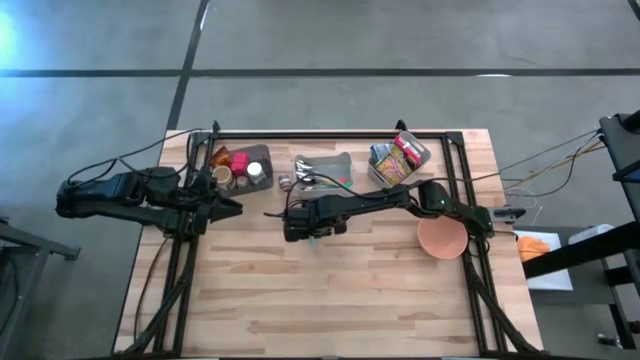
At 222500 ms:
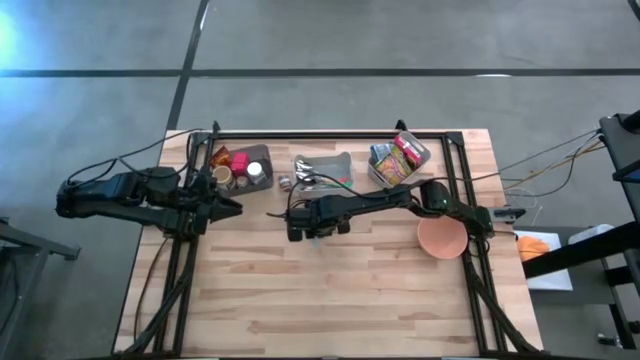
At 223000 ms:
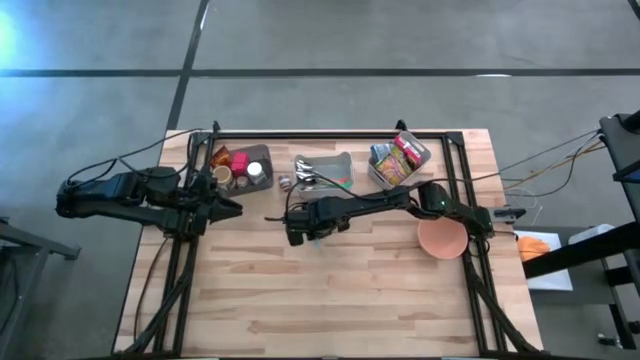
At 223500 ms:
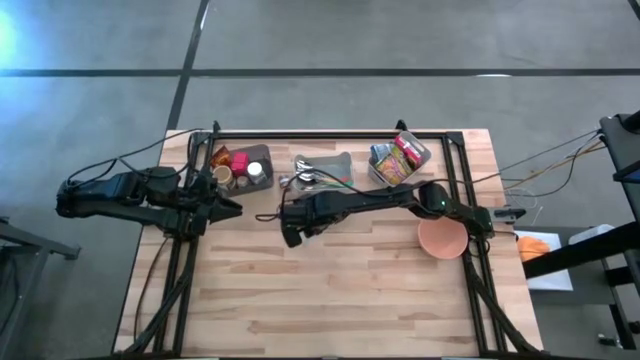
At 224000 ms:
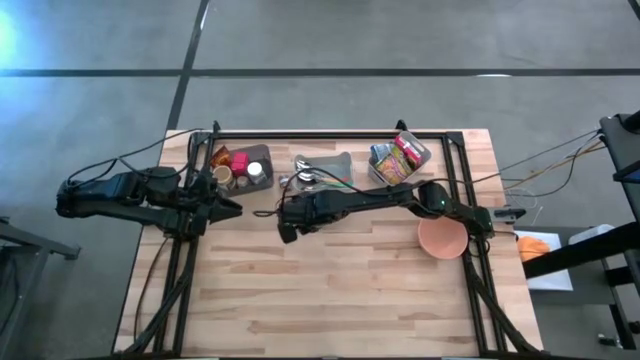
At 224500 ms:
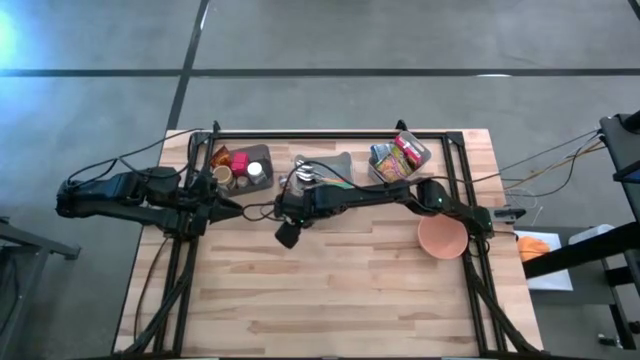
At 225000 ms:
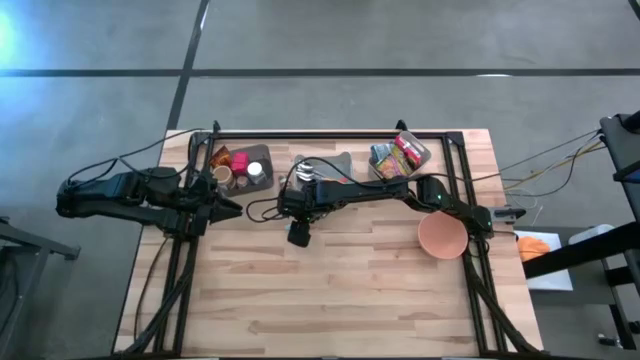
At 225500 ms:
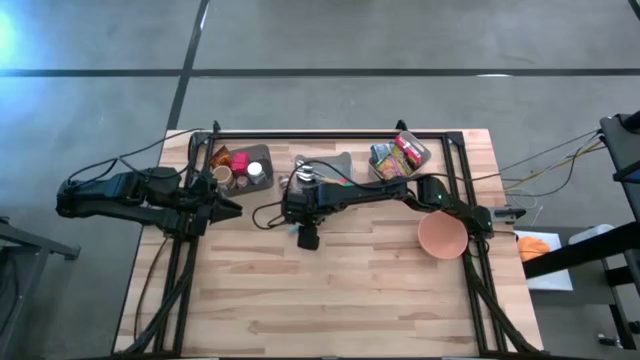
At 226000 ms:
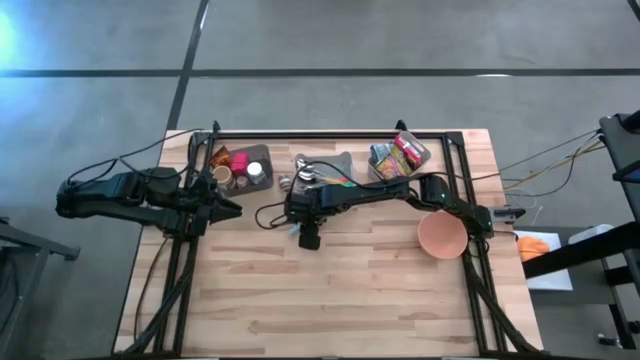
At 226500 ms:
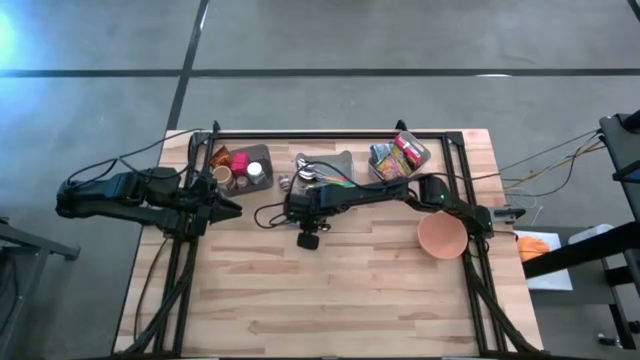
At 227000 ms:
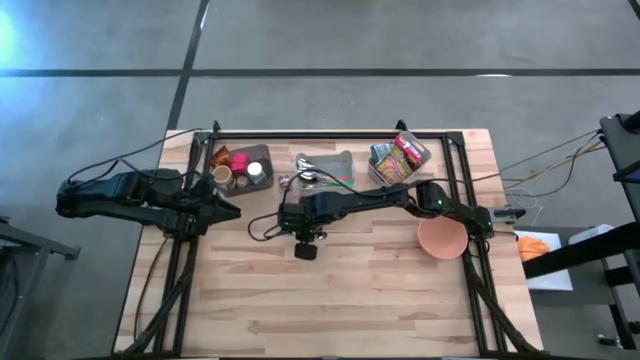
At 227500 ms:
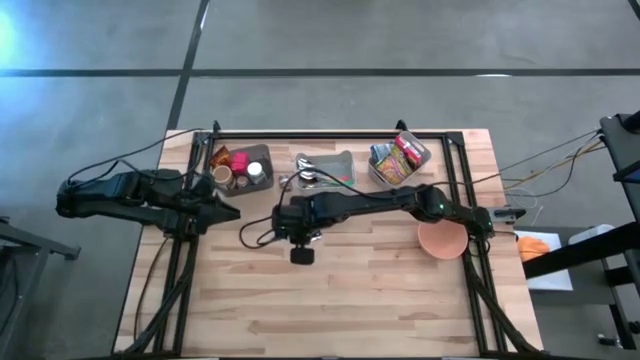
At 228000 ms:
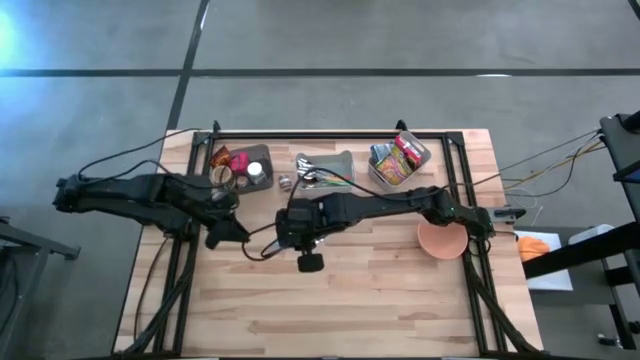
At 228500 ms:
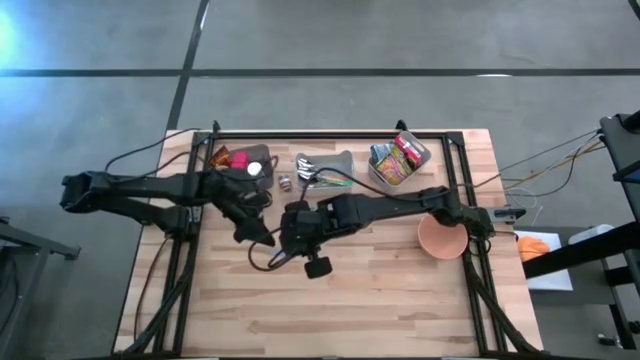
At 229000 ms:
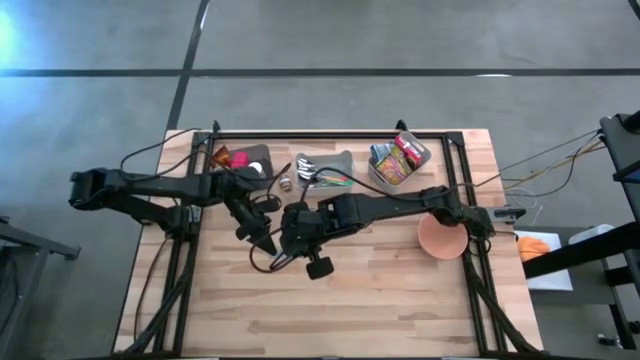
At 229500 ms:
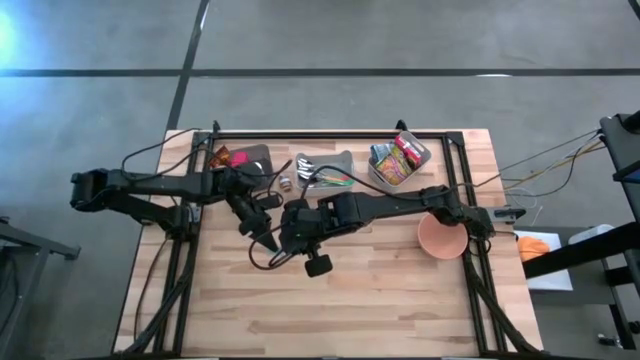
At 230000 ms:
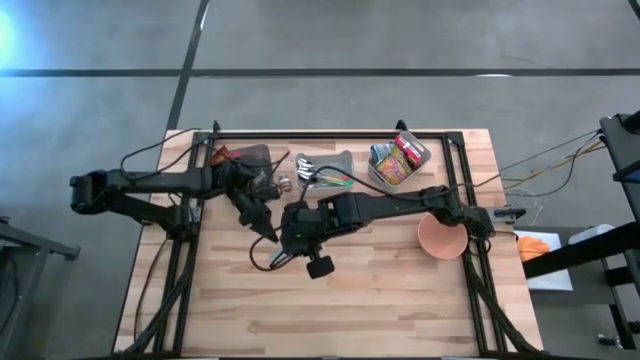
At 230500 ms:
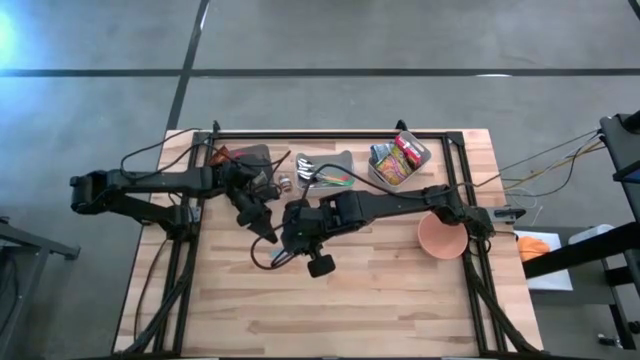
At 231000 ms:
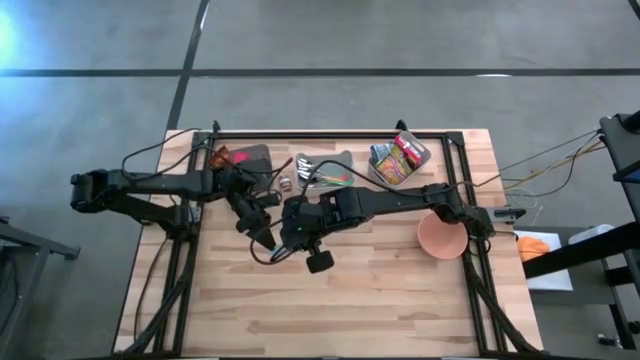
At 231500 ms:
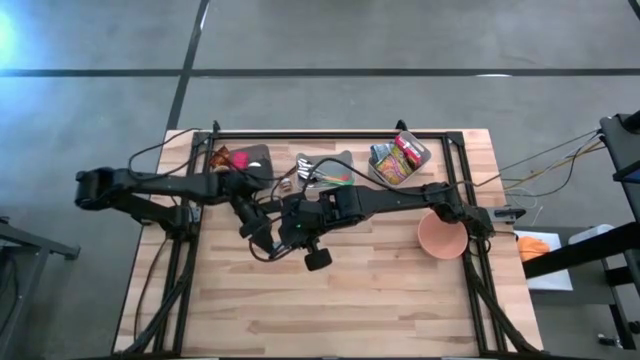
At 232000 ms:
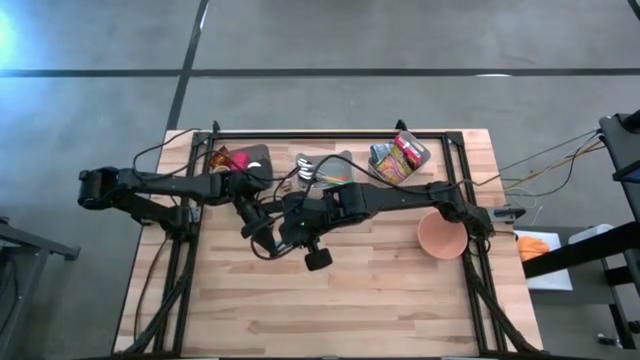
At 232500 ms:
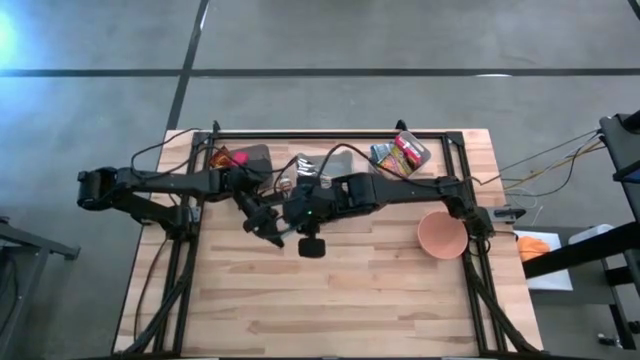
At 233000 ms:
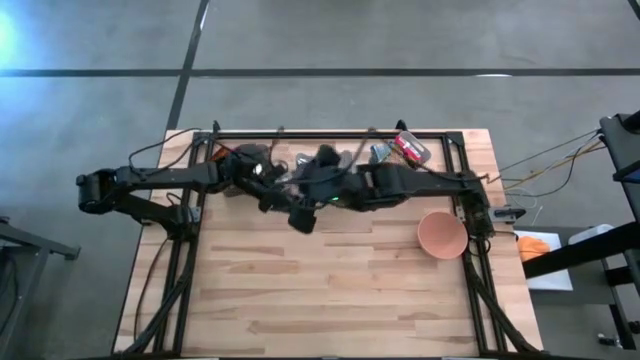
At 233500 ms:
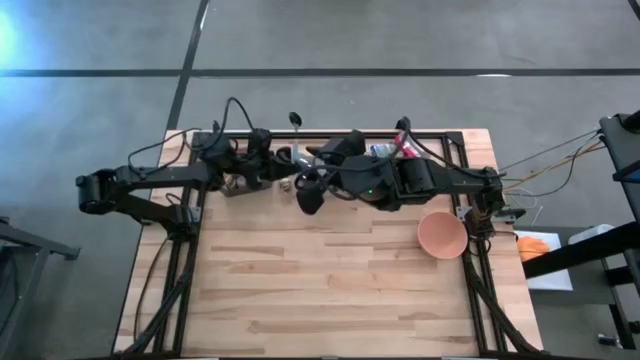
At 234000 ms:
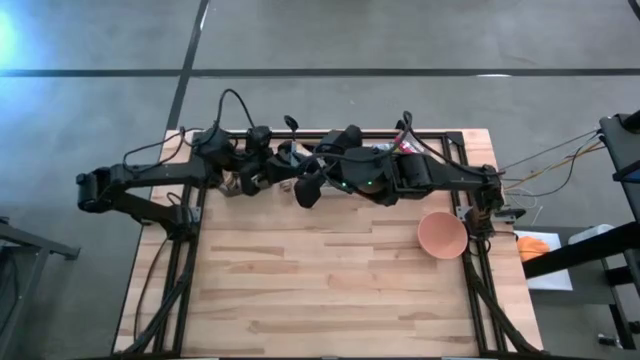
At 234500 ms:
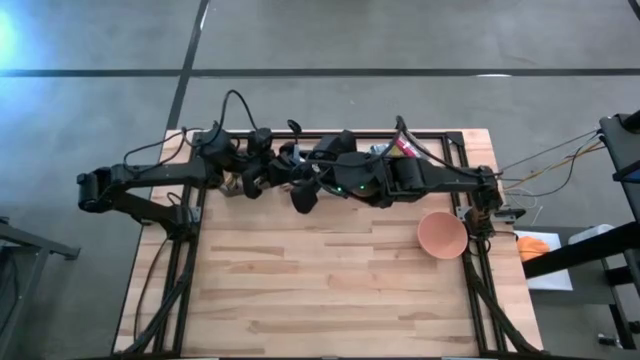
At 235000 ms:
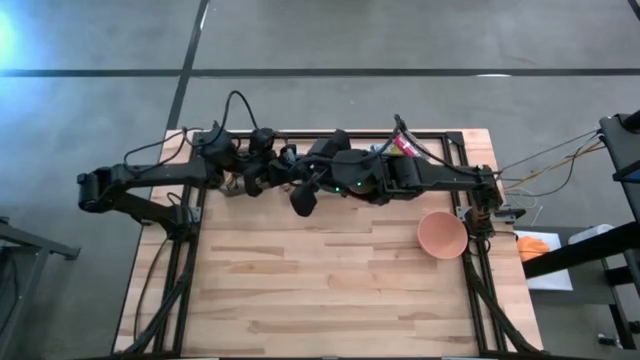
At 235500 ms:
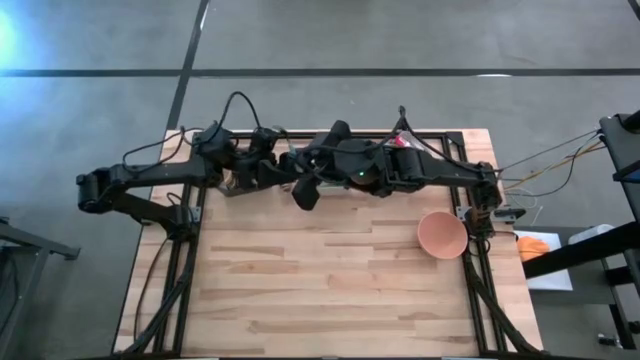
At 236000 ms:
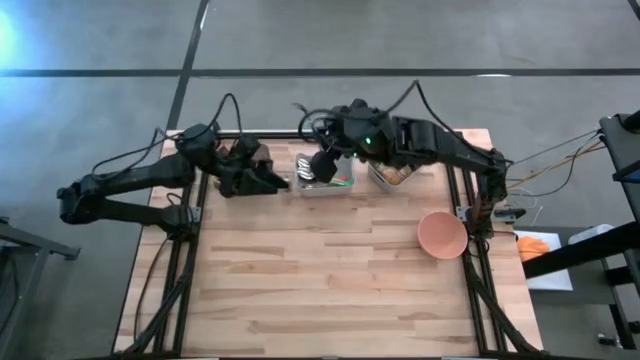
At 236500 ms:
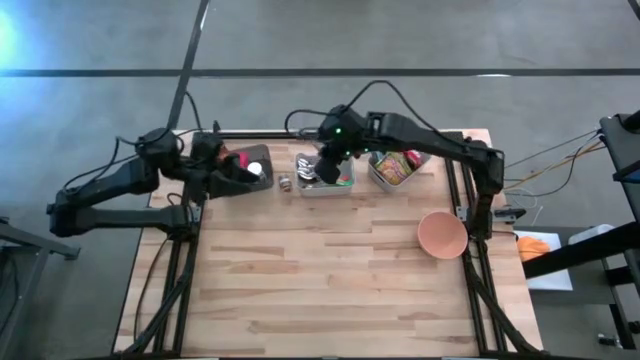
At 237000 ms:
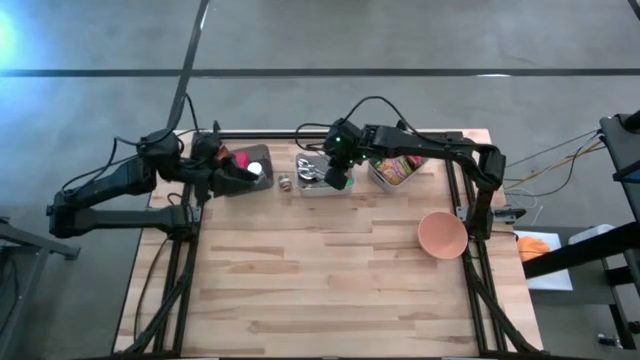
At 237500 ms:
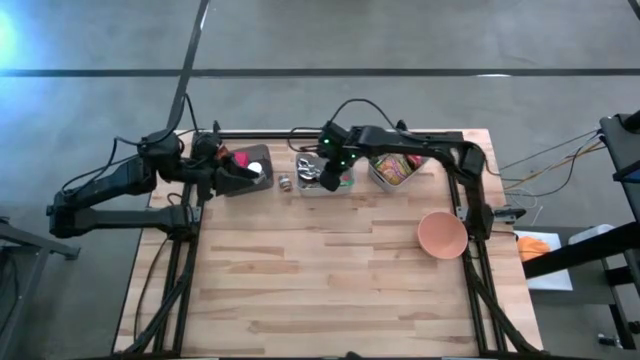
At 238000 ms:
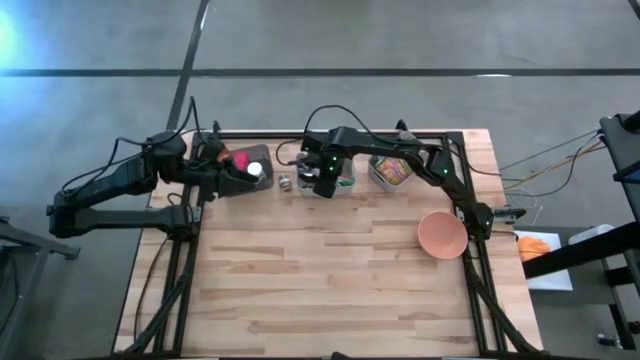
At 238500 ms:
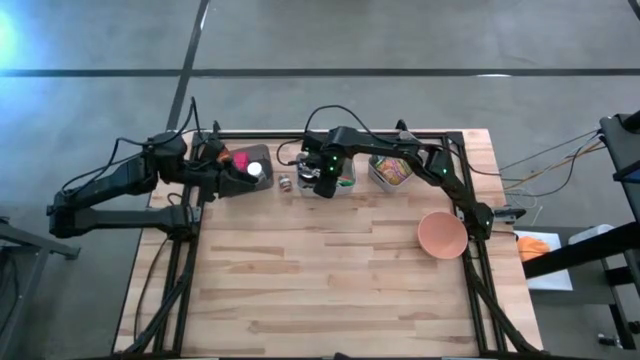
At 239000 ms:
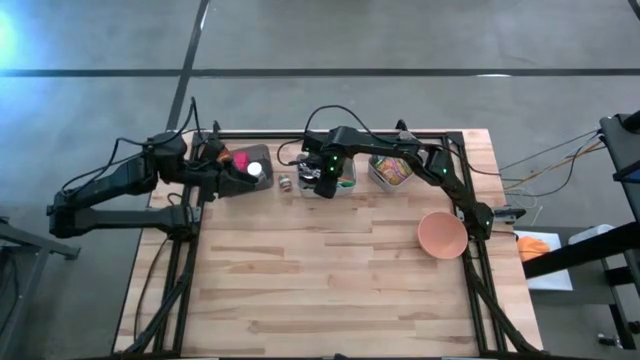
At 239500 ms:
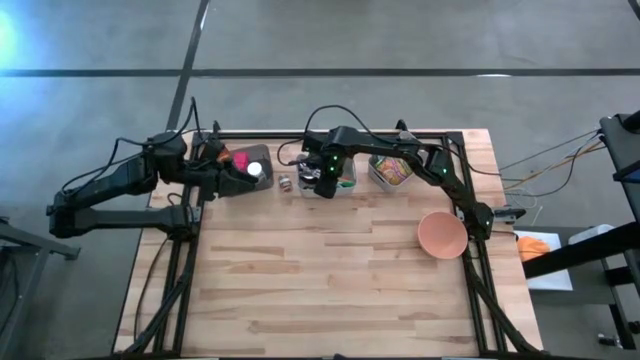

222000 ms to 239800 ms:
Put the small blue spoon into the right gray bin
